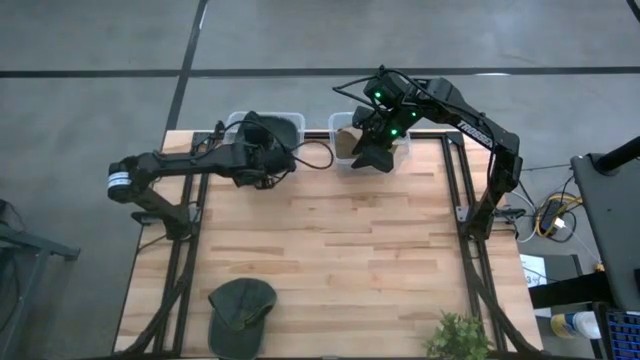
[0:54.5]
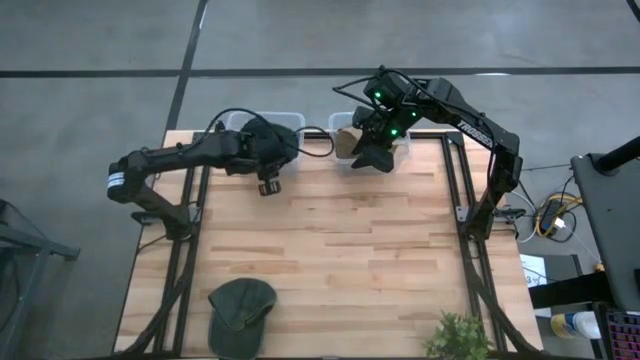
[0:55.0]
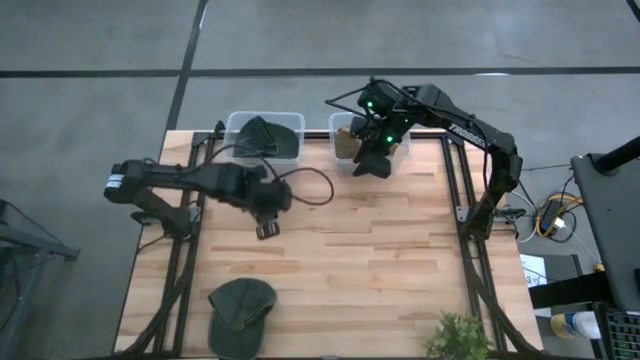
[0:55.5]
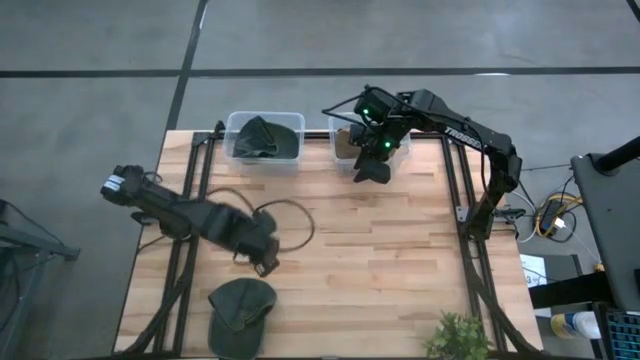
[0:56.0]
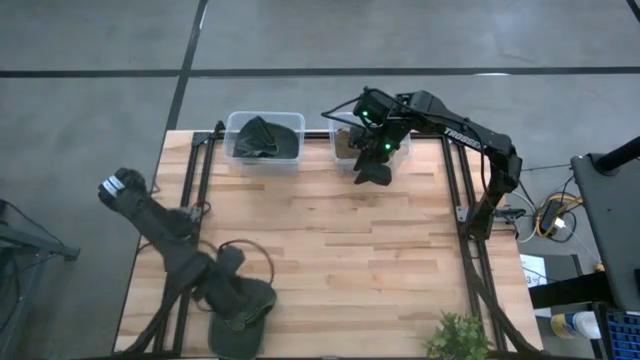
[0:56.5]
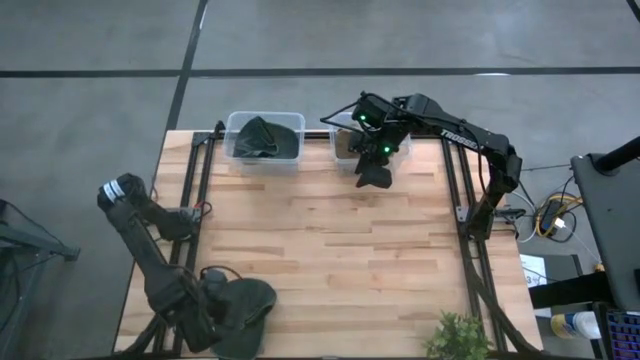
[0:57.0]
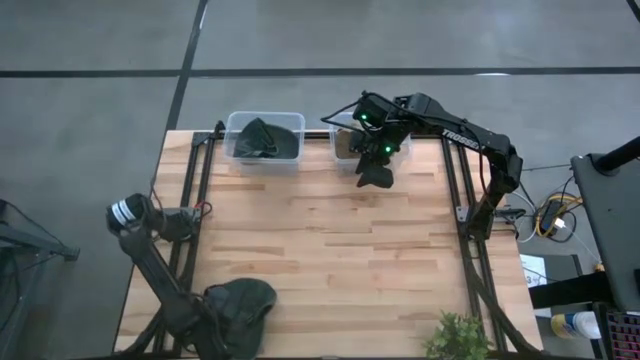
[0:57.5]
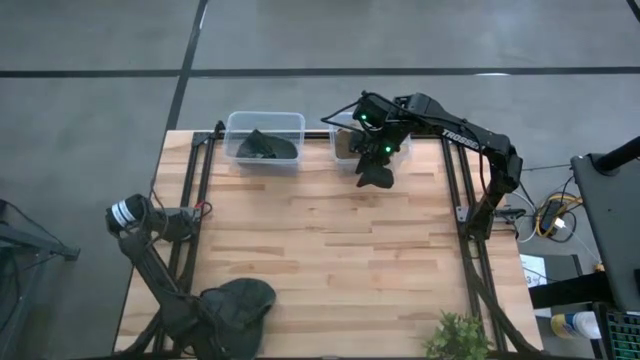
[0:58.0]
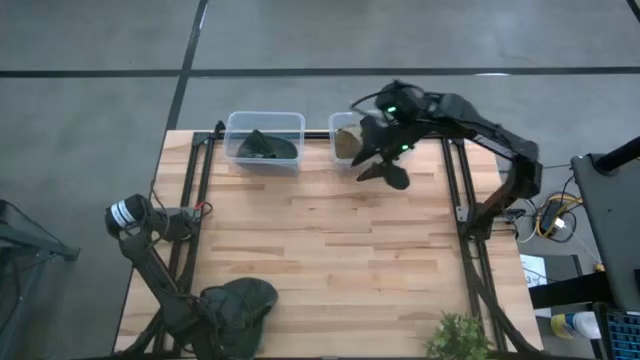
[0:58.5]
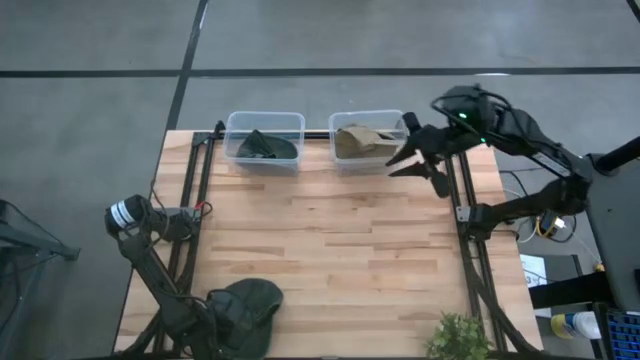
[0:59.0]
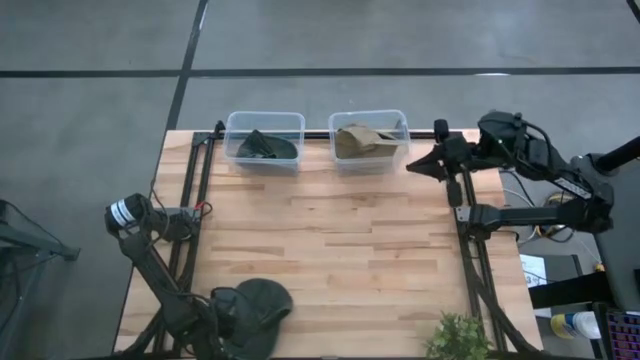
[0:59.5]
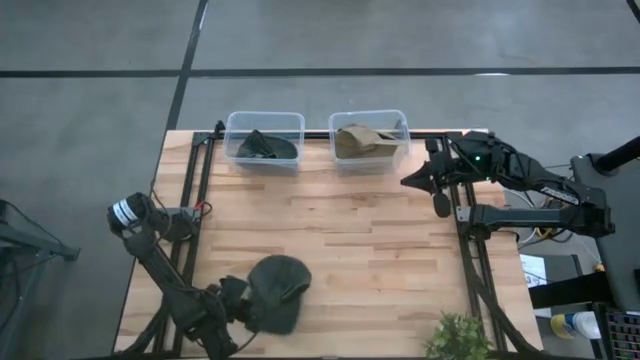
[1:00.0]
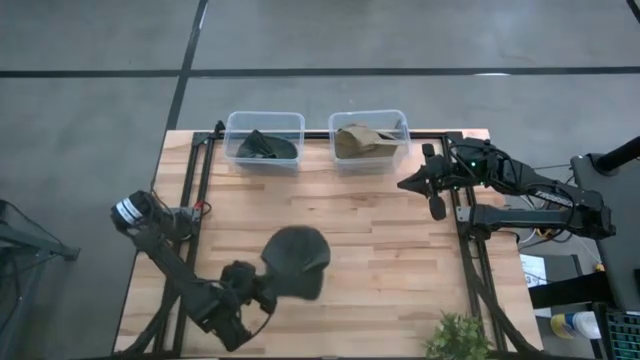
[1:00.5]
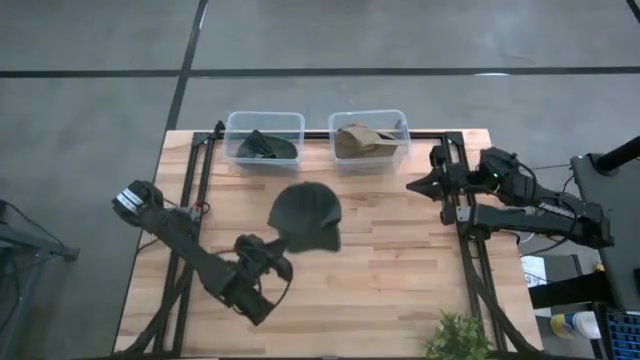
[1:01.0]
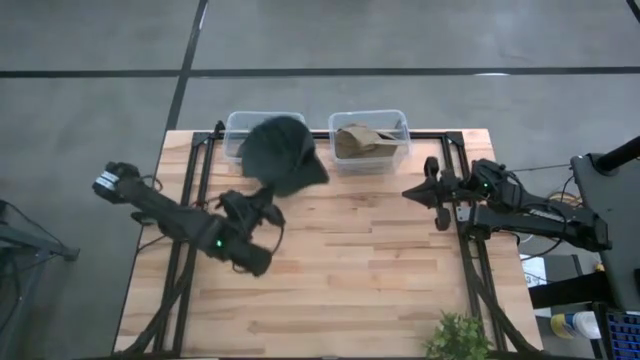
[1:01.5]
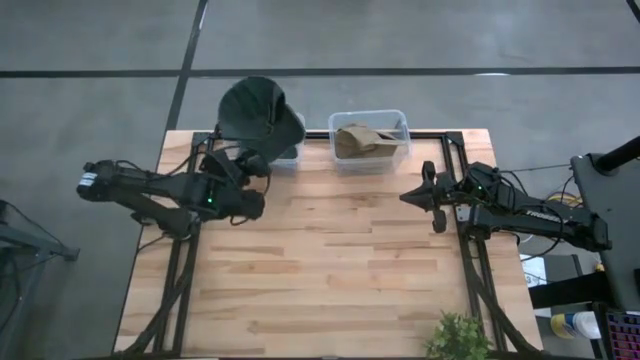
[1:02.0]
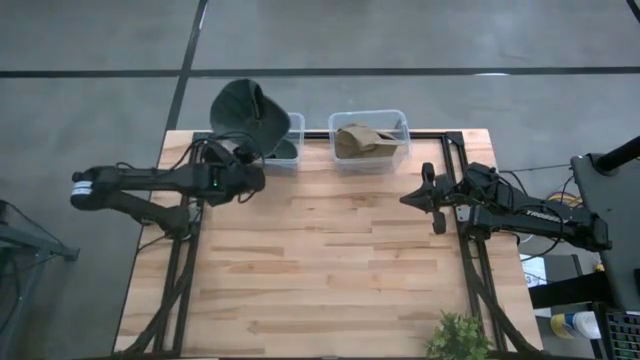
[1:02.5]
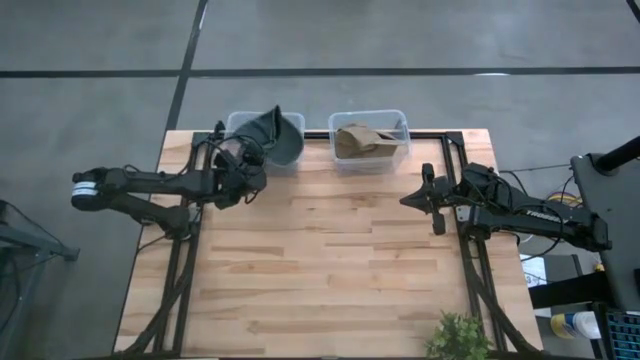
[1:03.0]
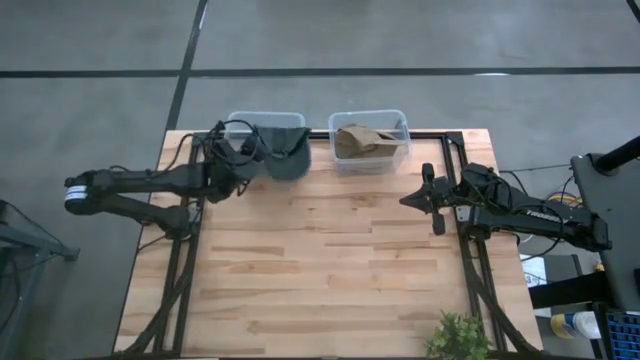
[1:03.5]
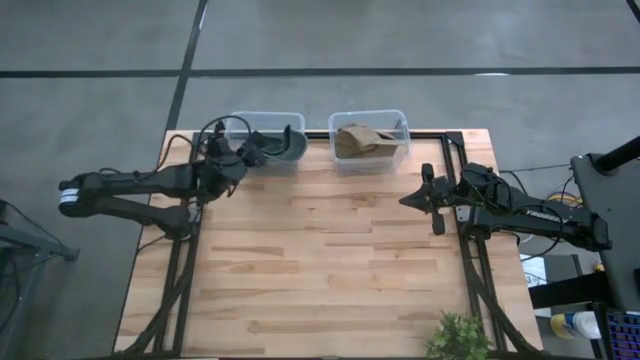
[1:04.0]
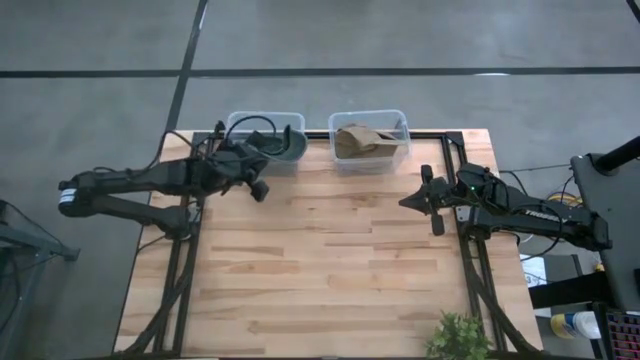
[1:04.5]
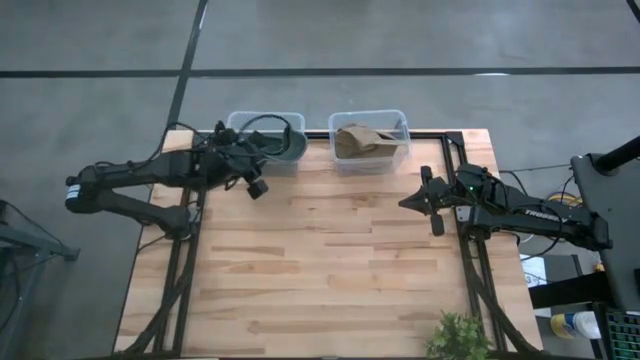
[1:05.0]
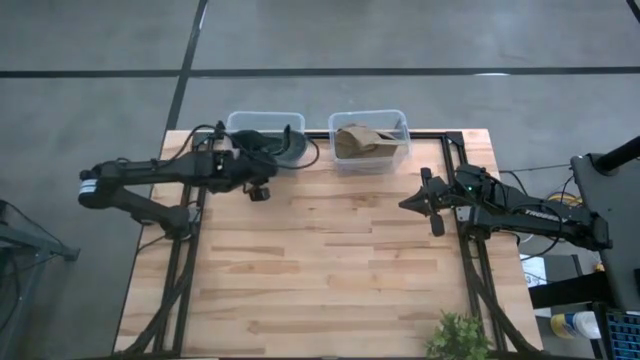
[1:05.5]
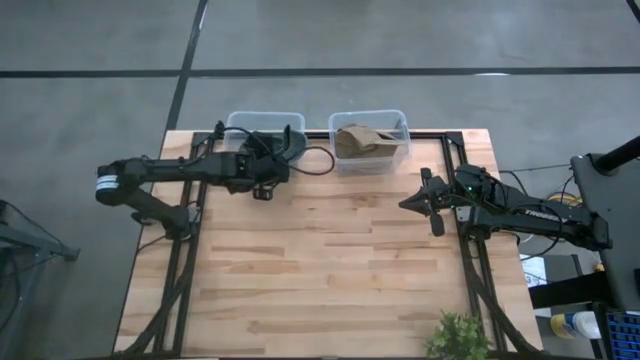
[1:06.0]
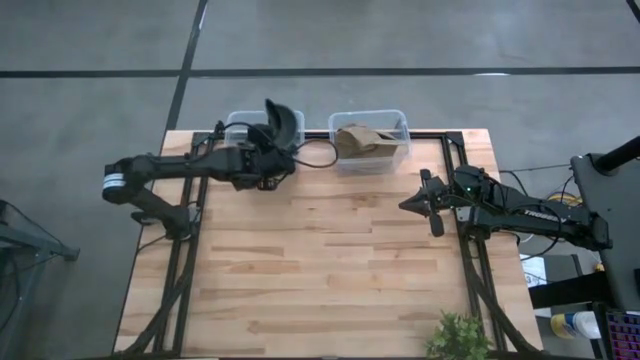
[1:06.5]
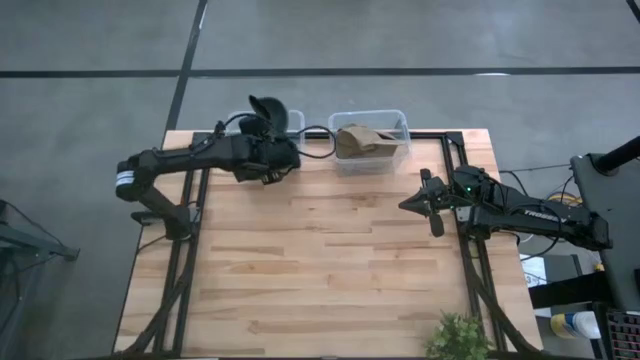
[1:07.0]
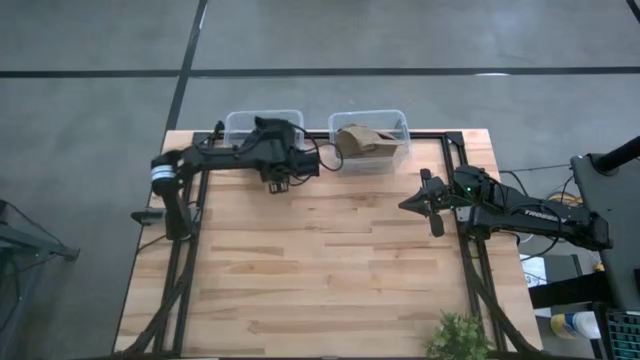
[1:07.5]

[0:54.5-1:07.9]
Task: Pick & Place hat
Put the green cap into the left transparent bin

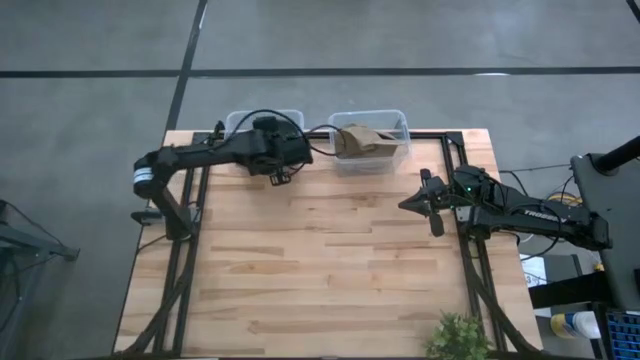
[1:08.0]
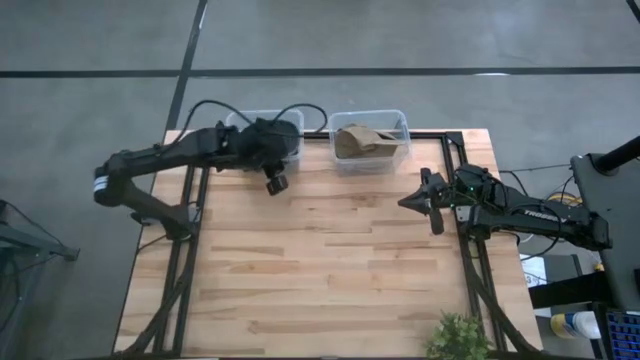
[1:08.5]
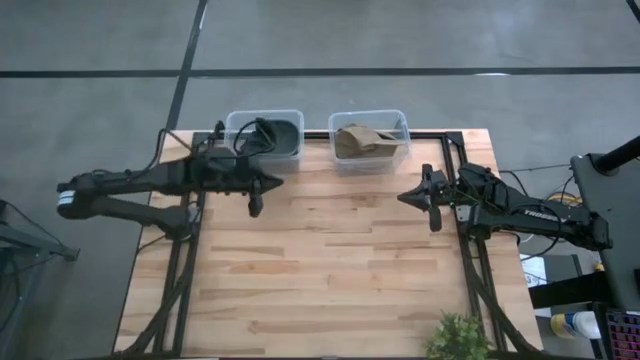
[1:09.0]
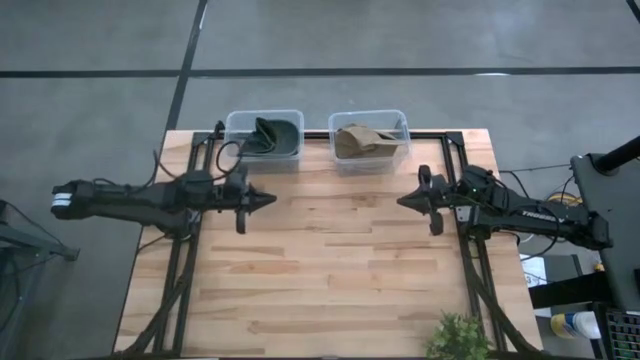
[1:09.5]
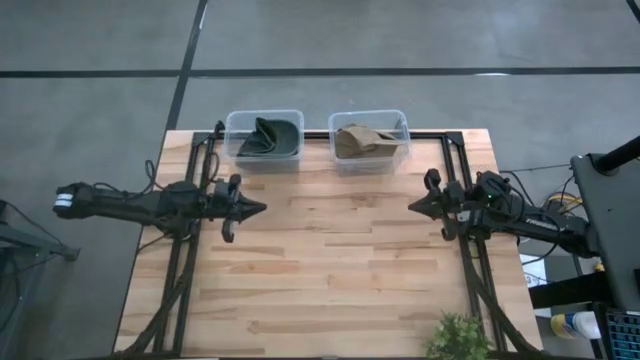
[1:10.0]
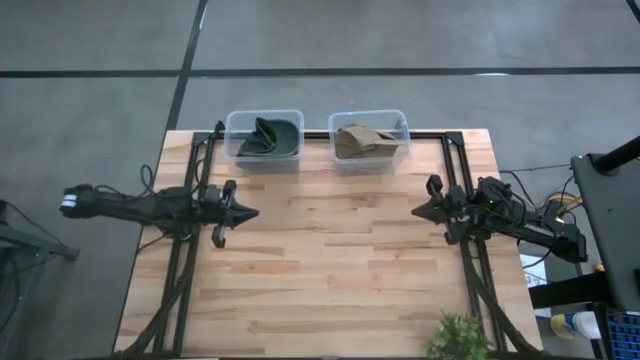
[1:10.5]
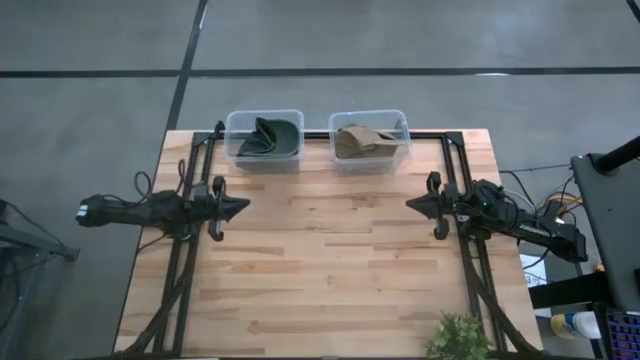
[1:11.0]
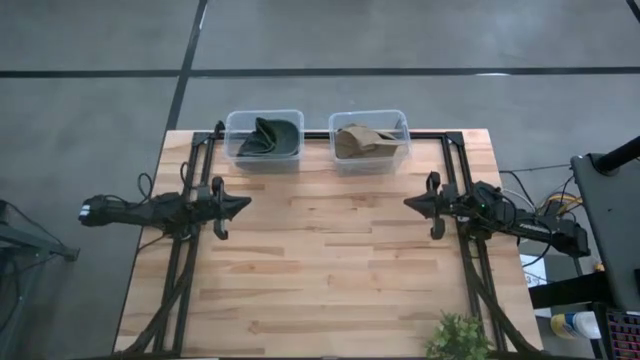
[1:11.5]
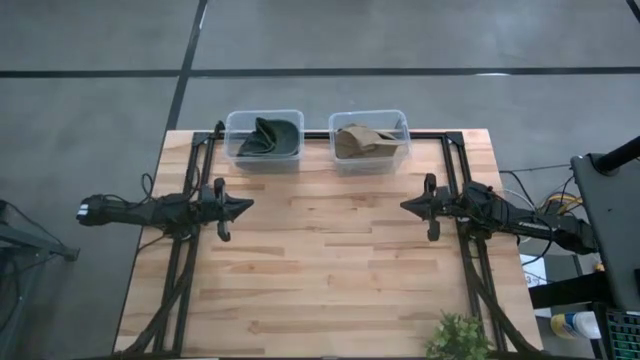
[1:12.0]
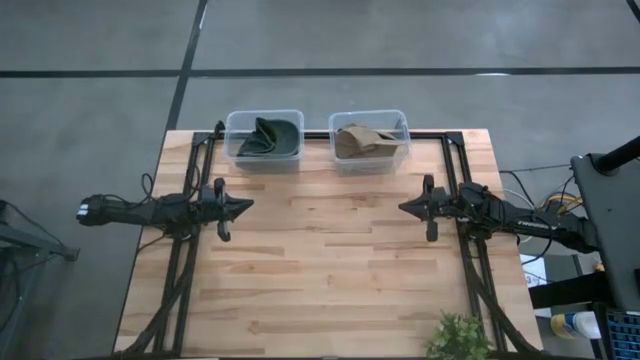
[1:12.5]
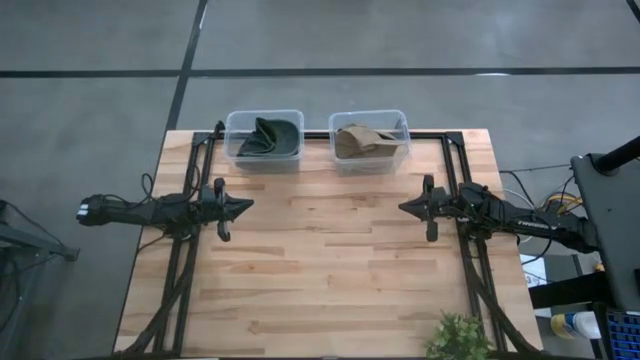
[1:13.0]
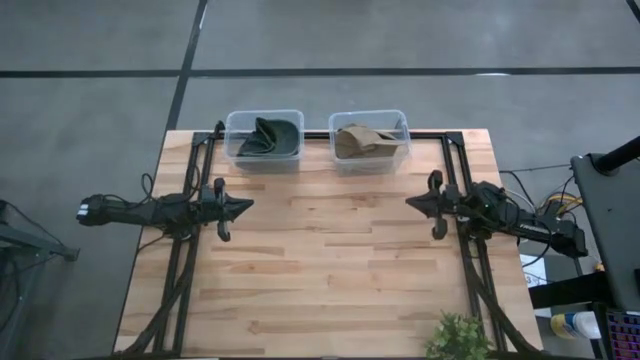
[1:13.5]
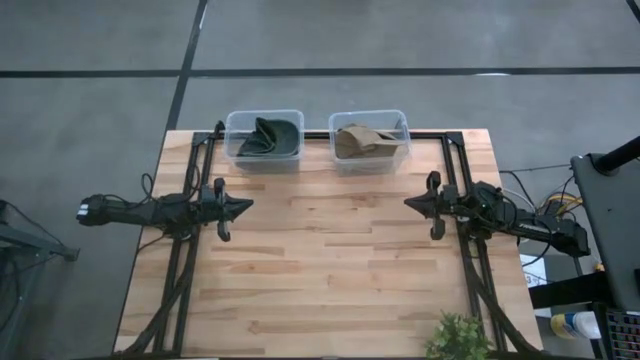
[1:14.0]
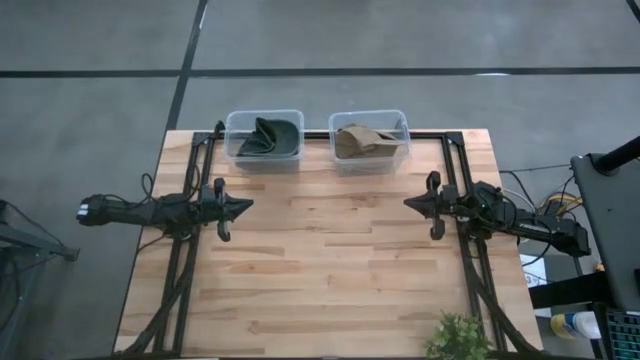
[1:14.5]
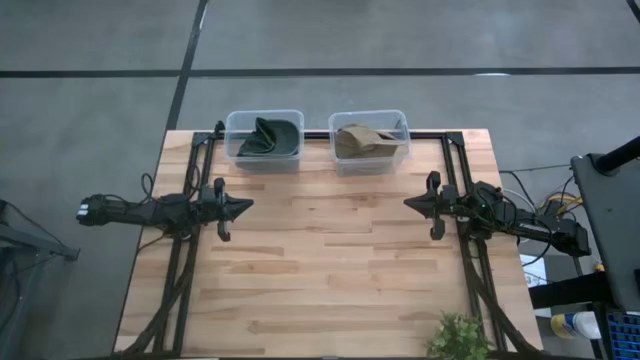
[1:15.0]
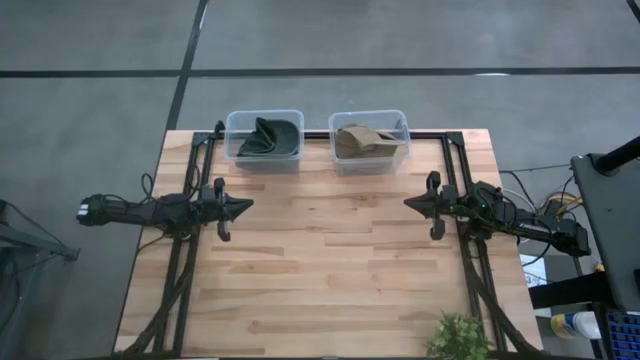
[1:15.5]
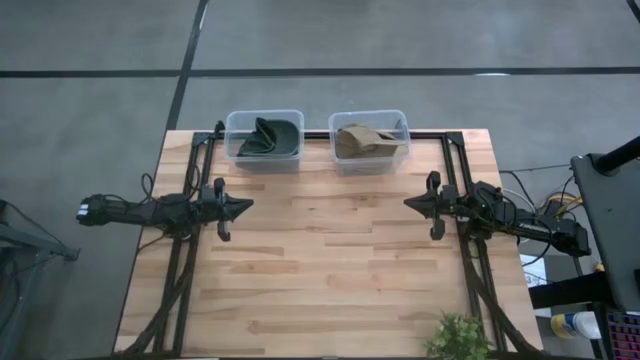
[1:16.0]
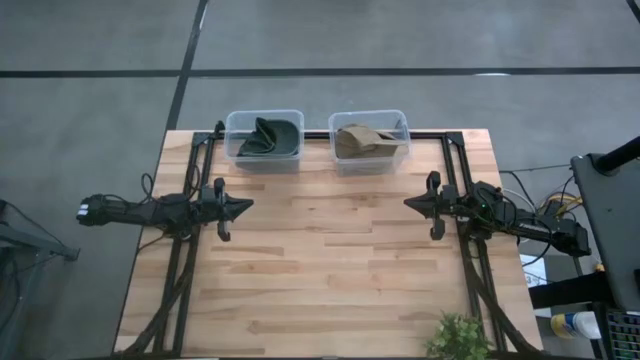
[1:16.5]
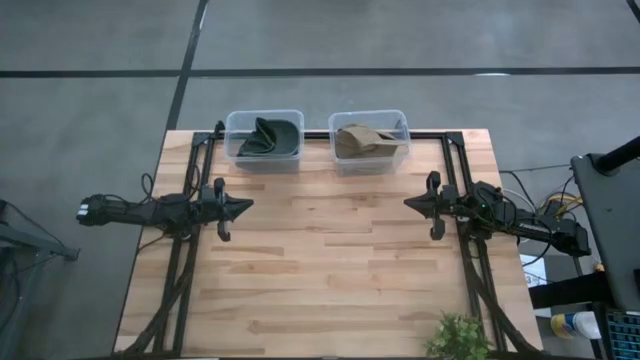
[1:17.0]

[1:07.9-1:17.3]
Return to Home Position
